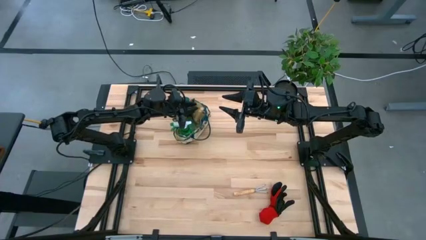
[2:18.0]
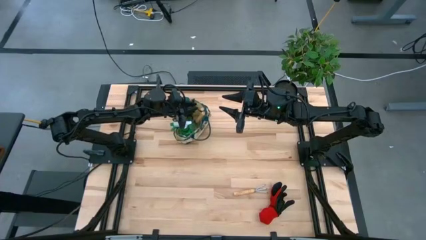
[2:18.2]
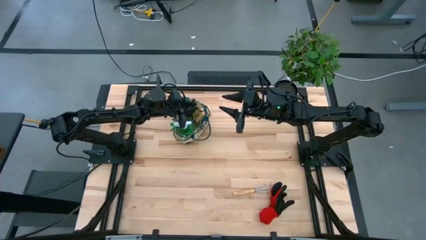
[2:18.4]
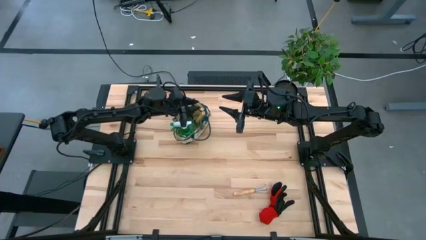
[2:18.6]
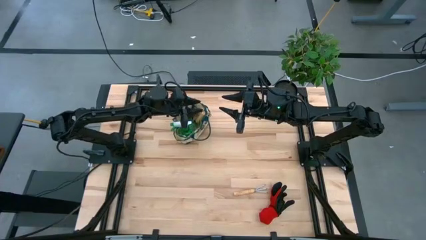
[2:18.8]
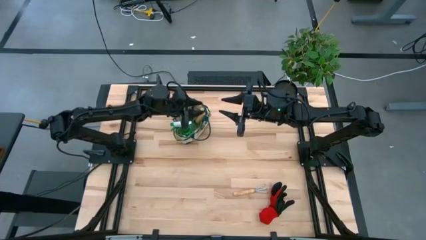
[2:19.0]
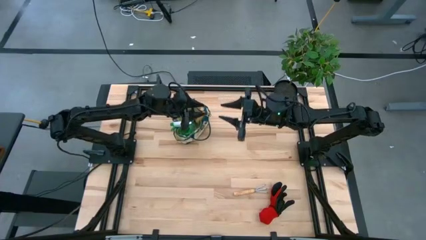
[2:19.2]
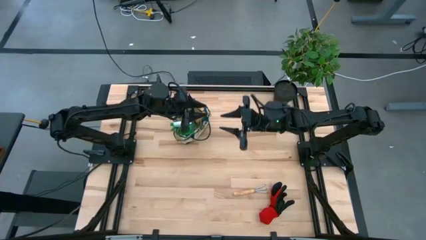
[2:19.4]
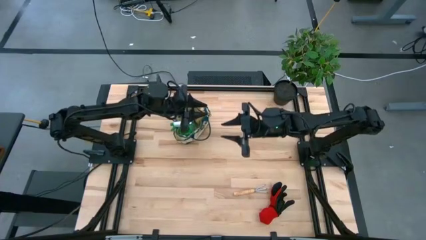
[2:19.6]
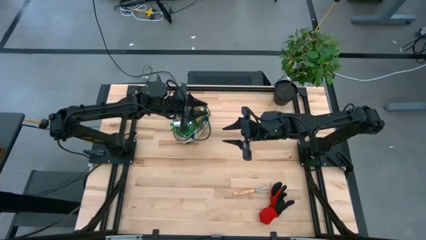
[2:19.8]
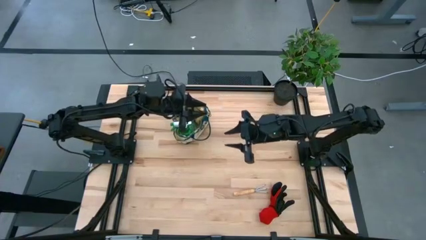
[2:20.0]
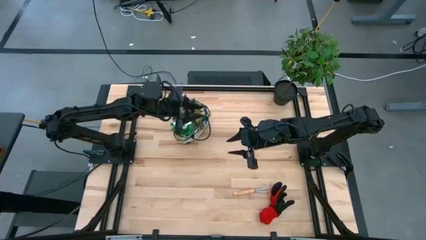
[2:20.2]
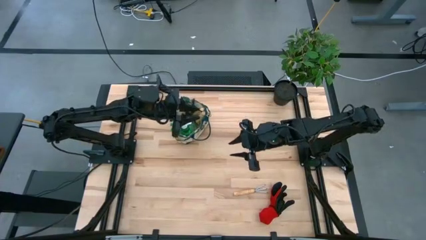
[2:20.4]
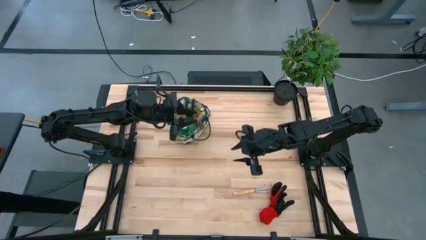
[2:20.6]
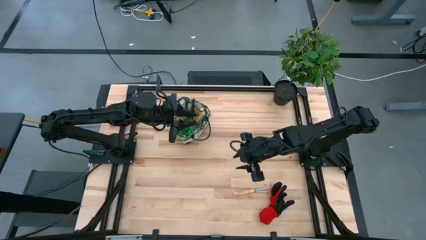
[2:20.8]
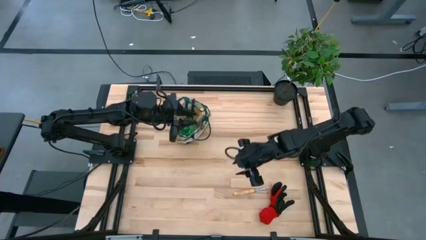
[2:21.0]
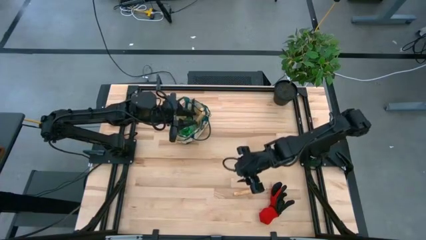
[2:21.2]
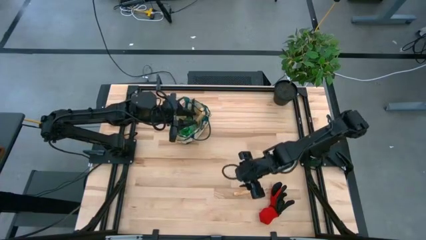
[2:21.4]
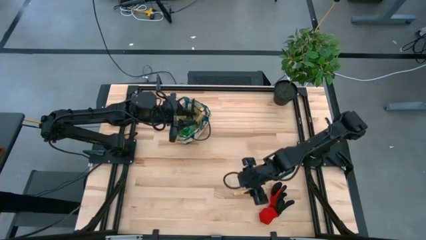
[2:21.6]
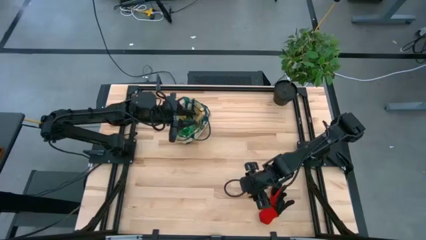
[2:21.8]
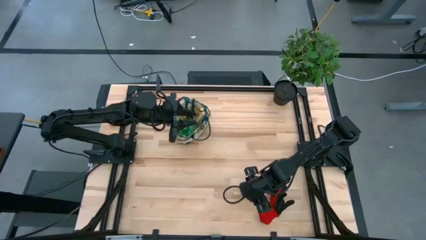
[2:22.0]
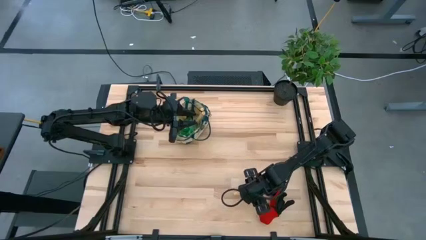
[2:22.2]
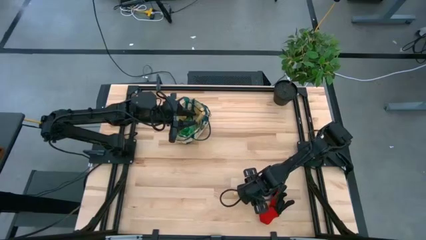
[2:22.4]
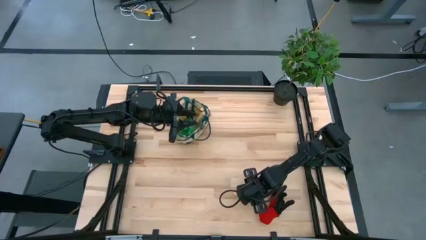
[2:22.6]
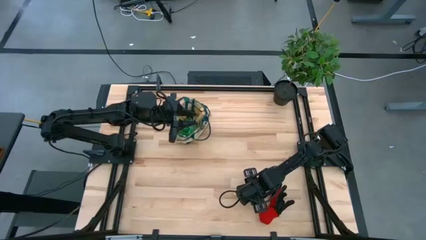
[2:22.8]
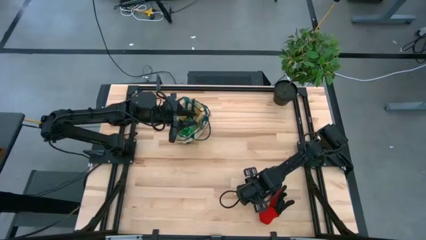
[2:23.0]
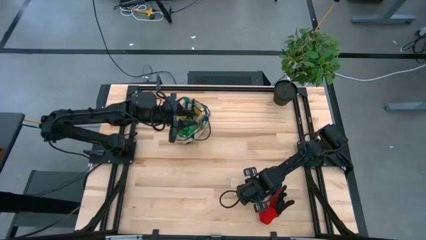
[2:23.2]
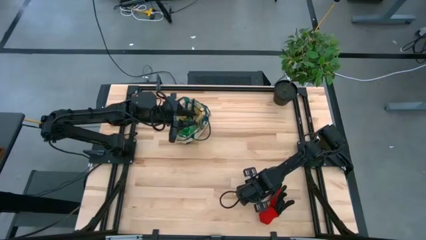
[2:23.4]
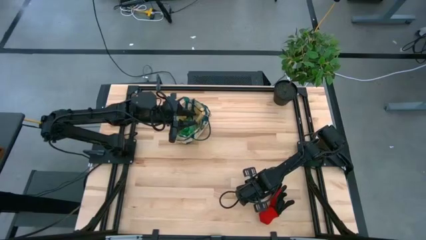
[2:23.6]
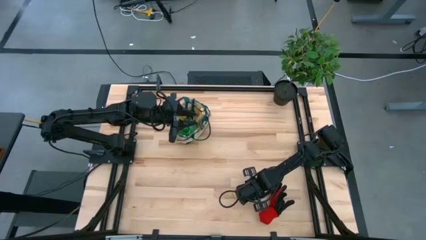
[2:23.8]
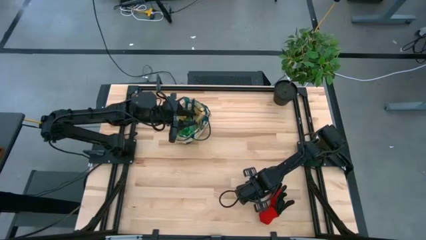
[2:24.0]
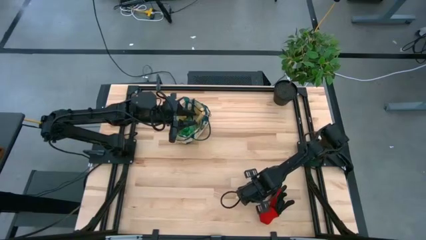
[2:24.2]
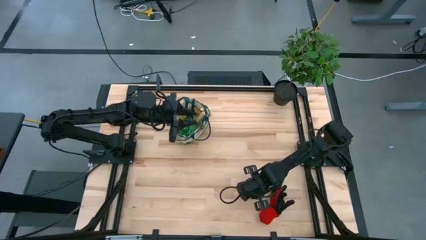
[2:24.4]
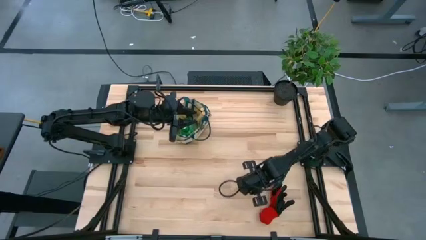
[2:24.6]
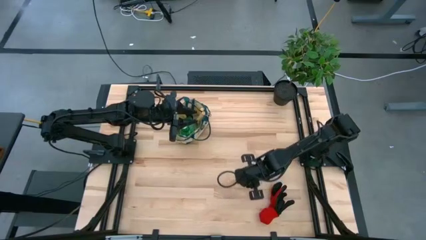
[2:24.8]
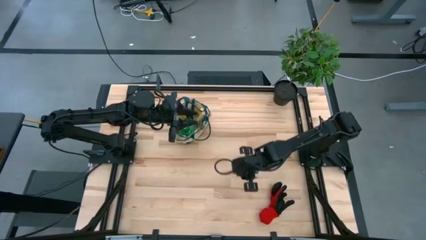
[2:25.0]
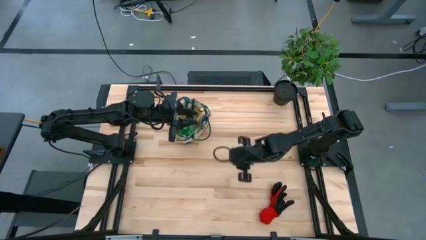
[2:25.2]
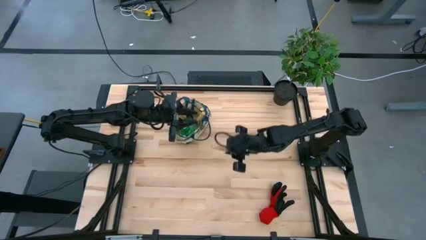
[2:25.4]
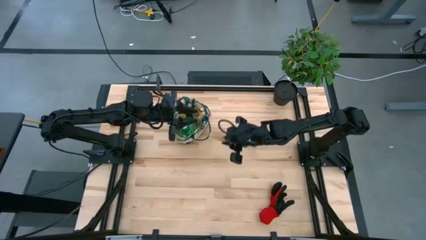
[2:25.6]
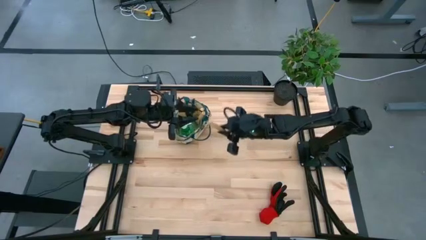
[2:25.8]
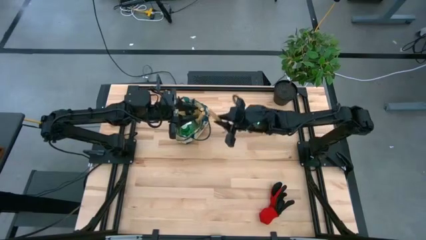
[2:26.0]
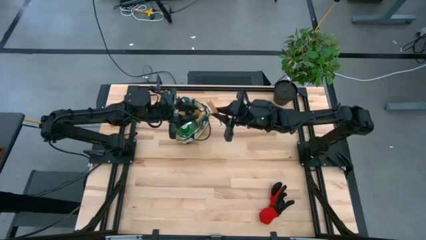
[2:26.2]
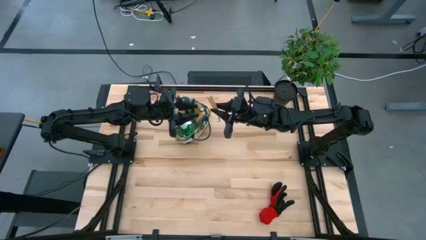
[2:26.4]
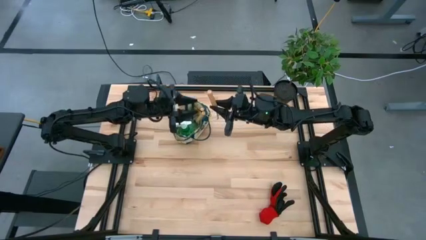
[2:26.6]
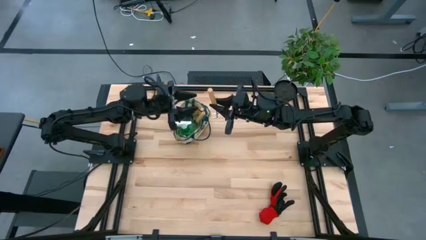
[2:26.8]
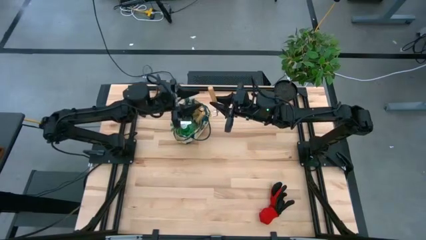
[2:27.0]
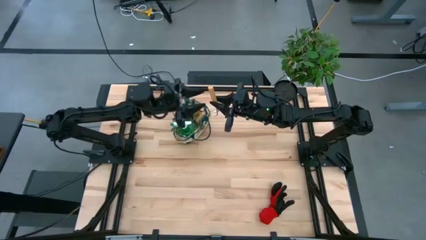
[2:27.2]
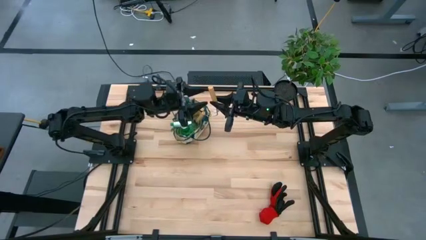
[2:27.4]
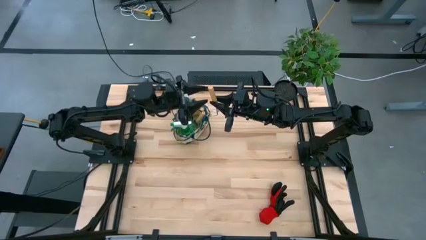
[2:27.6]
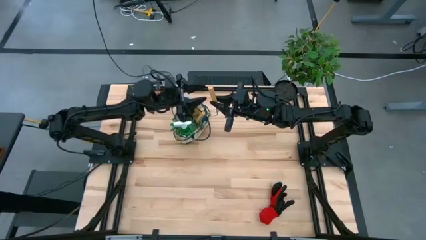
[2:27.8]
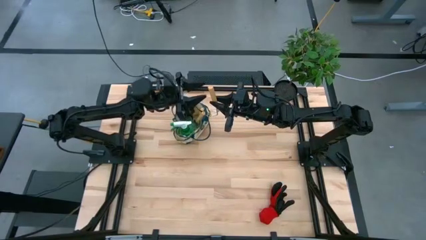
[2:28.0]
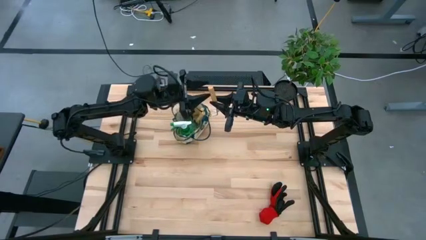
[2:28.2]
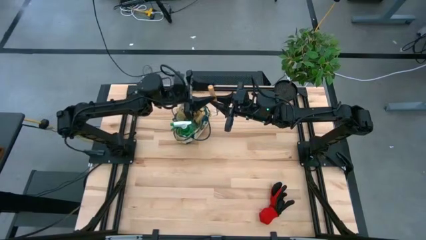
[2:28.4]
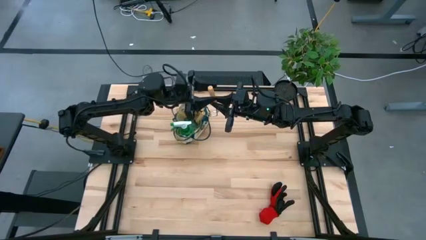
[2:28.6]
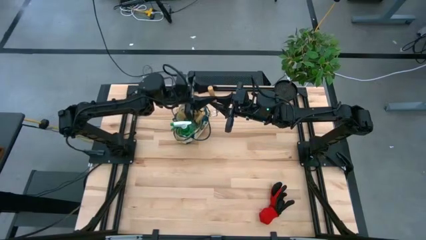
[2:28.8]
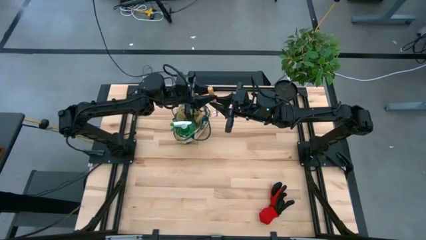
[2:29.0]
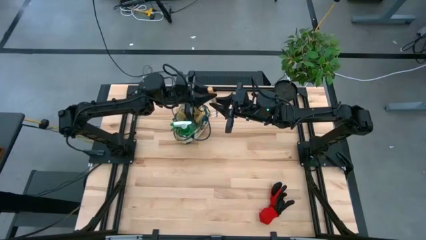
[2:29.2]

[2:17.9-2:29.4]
Task: Pick & Place Garden tools in Gardening bag
Put the brown hand rake into the gardening bag

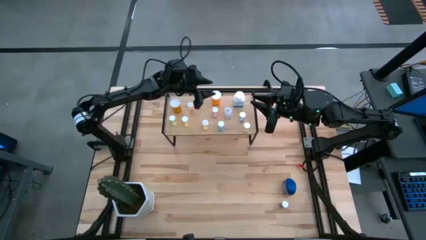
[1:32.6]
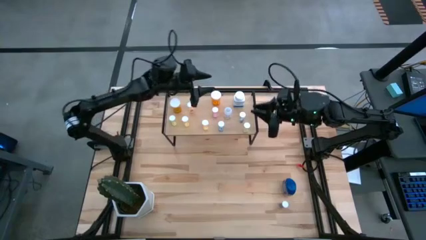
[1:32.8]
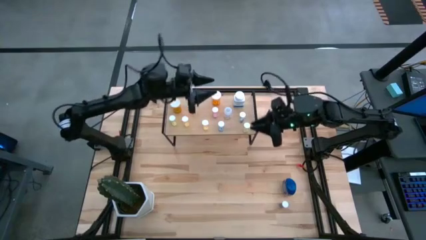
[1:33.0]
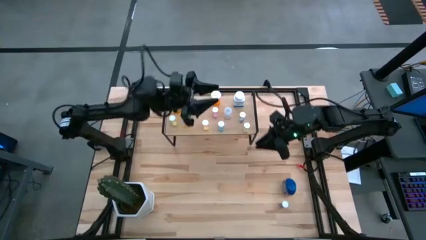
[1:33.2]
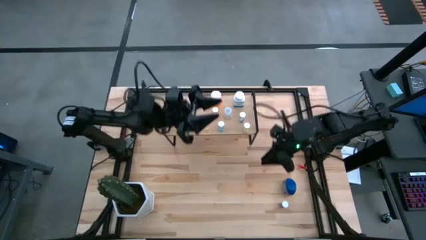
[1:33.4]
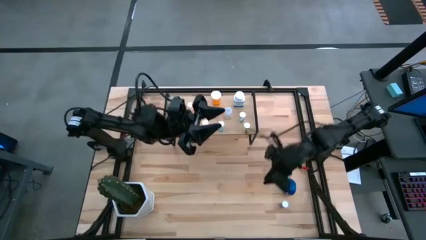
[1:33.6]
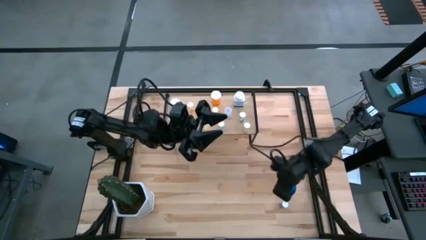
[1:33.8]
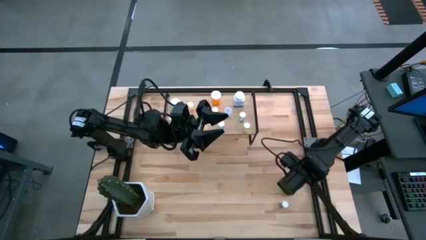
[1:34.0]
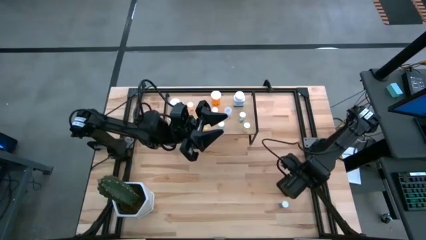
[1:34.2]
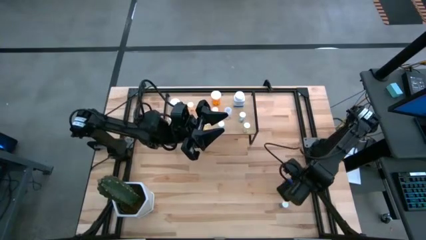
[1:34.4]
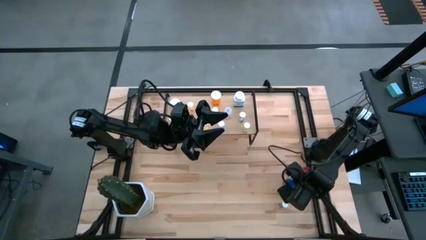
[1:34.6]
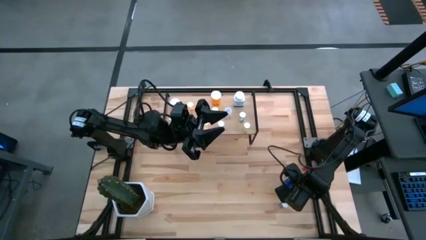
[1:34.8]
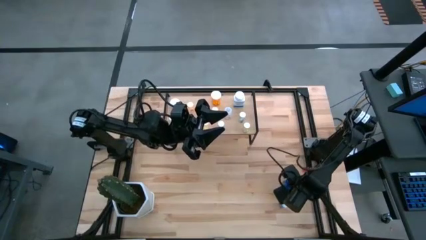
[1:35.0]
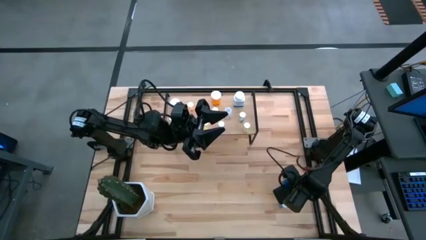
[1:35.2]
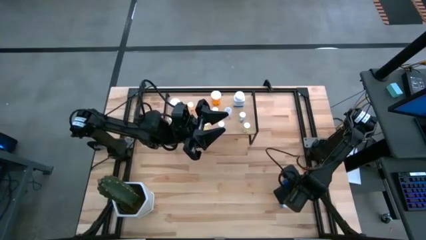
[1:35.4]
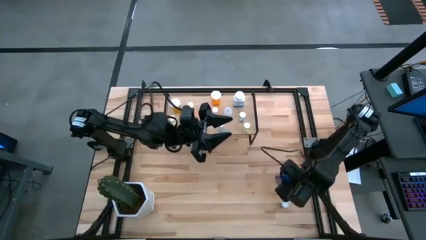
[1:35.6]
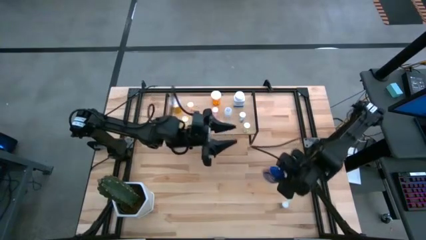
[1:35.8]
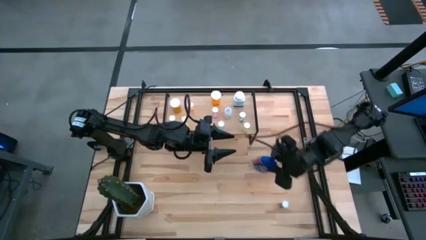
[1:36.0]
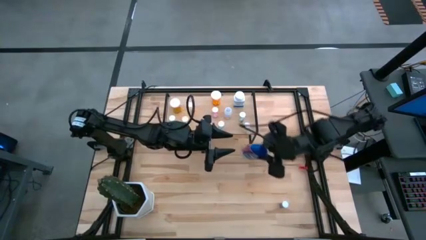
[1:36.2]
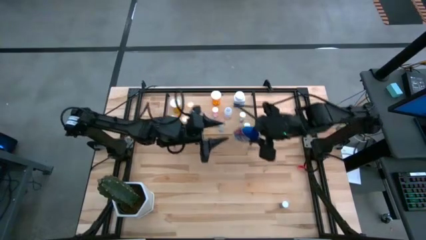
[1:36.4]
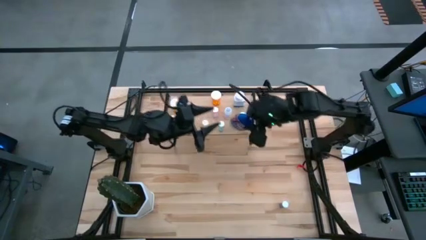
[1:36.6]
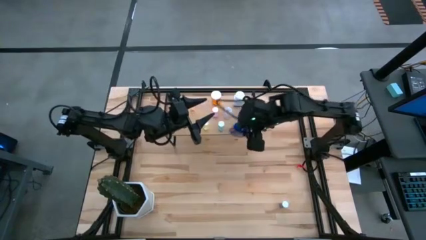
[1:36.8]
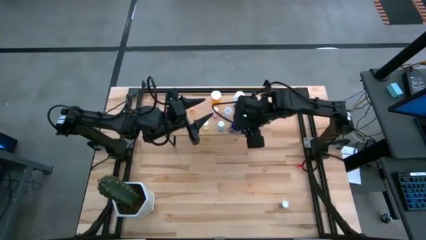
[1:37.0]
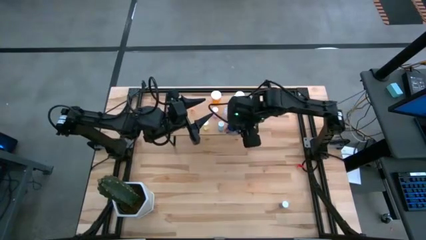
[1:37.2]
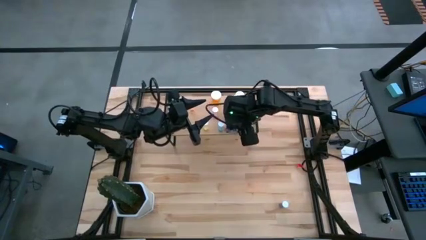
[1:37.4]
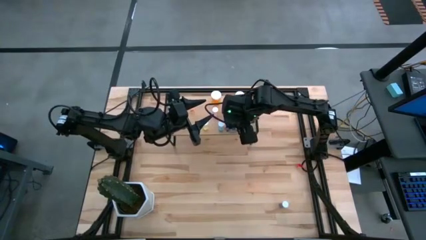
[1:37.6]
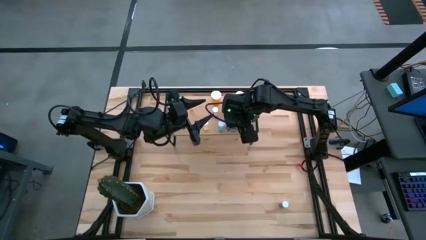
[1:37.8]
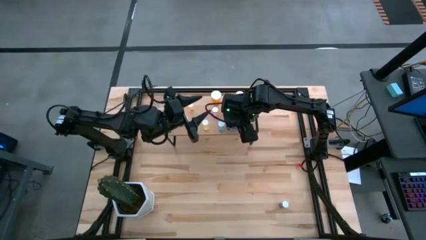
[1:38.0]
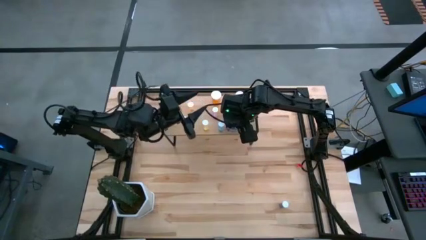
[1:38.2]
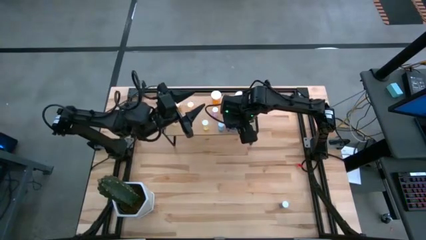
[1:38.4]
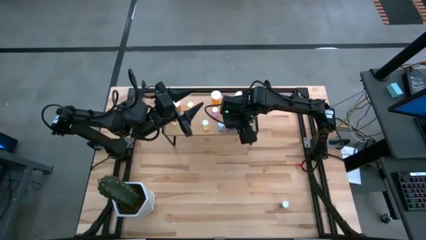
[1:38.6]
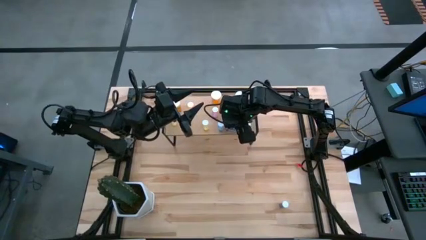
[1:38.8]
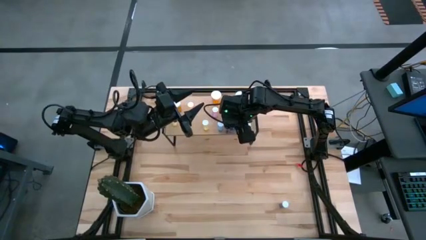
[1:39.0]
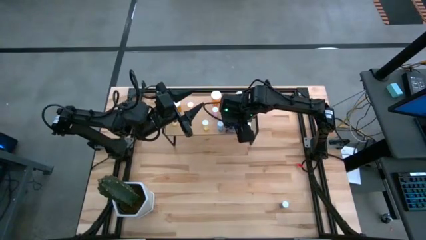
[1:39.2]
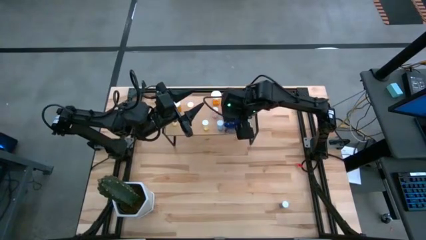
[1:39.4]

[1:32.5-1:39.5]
Task: Pick and place medicine bottles onto shelf by color
Put the dark blue pill bottle on the shelf
